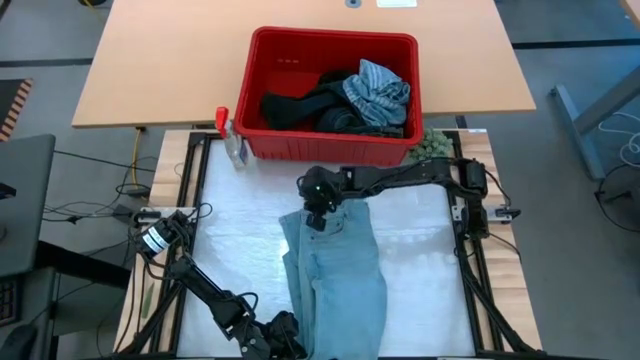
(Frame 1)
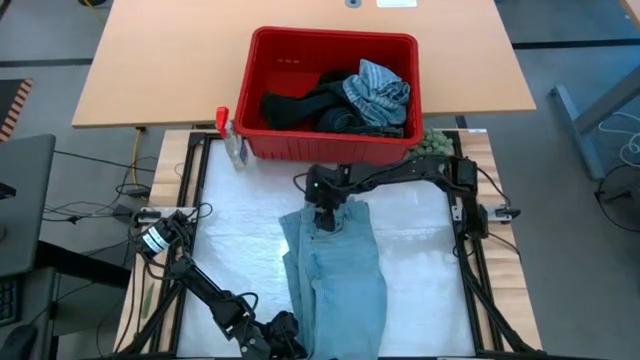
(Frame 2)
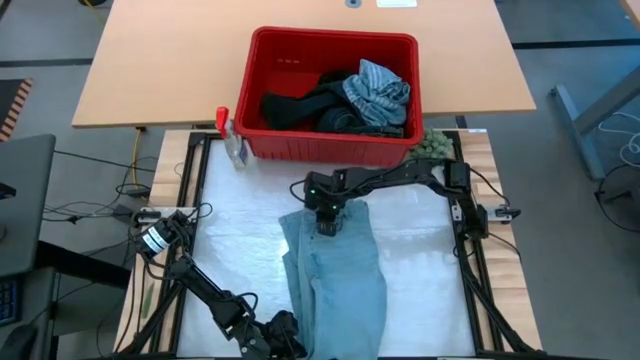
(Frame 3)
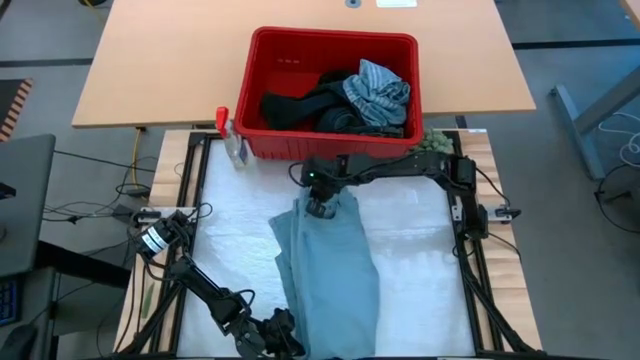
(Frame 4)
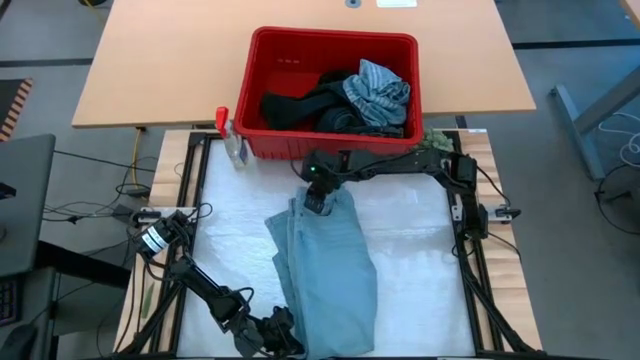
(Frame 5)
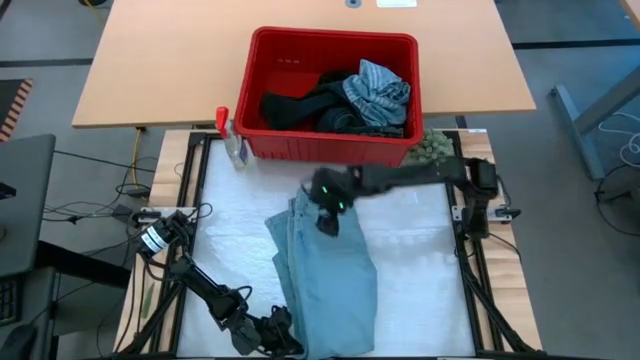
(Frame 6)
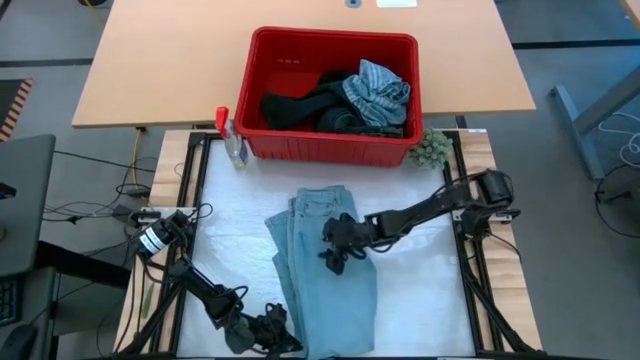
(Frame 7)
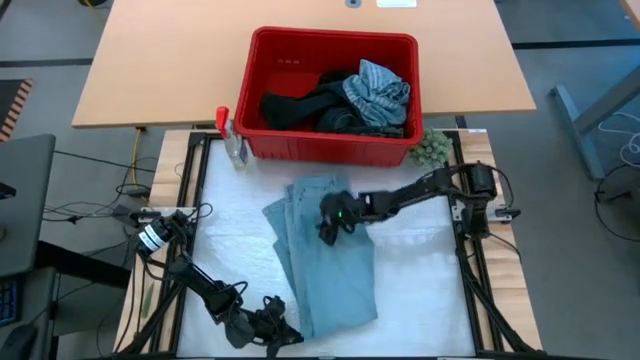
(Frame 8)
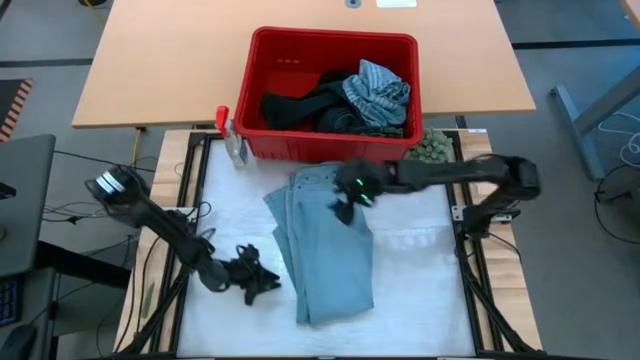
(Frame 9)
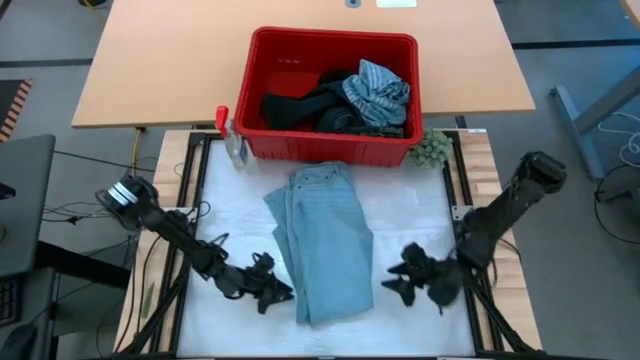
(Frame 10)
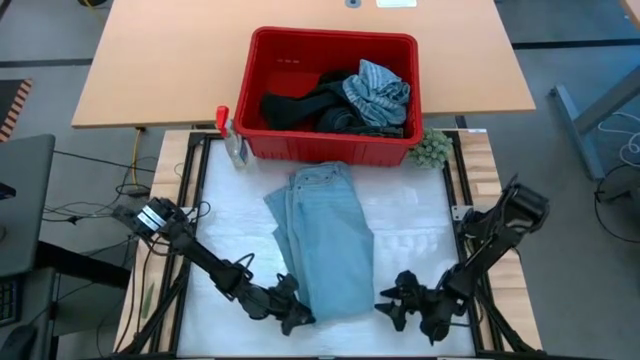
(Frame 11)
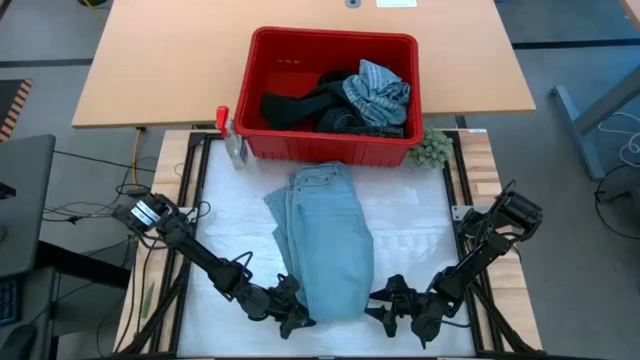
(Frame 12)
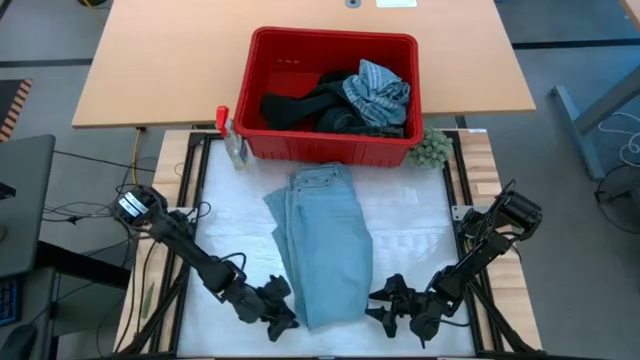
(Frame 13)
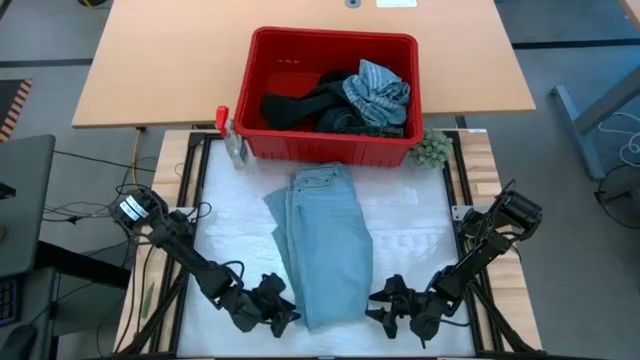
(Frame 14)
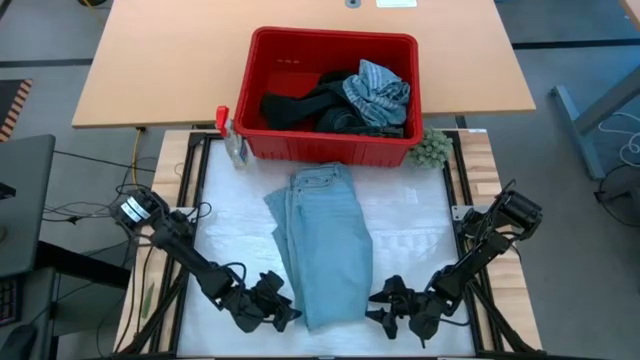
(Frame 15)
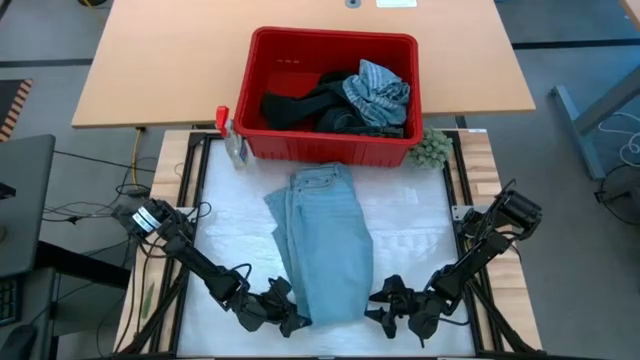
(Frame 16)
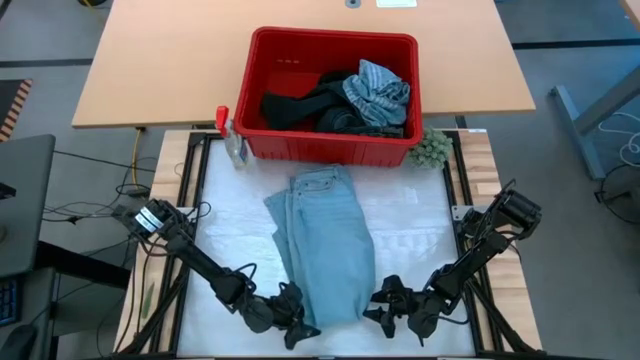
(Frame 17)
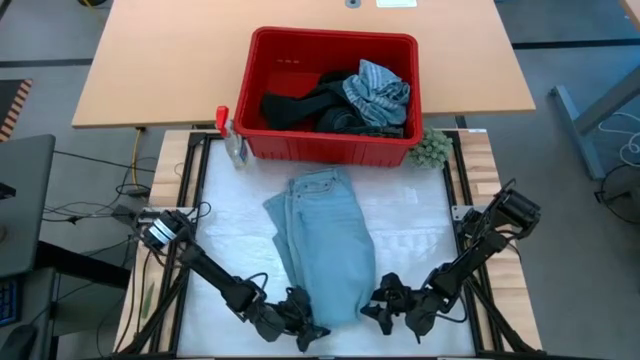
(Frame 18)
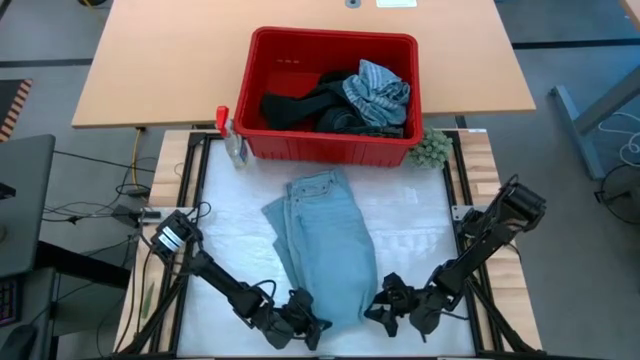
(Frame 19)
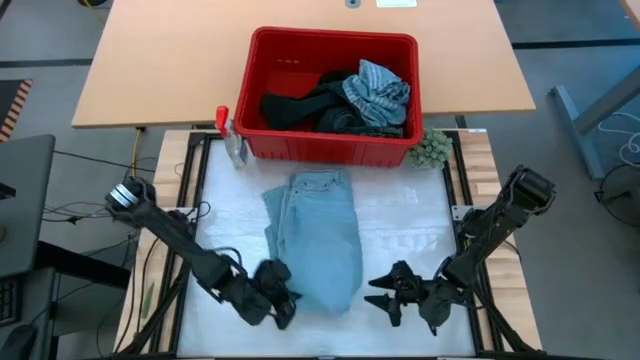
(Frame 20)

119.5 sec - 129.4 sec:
Task: Fold laundry
Fold the blue pants from the red laundry bin

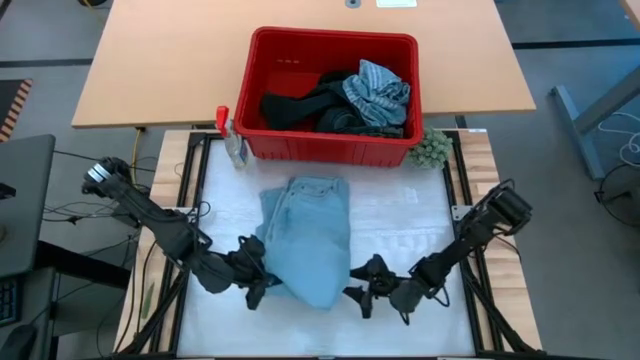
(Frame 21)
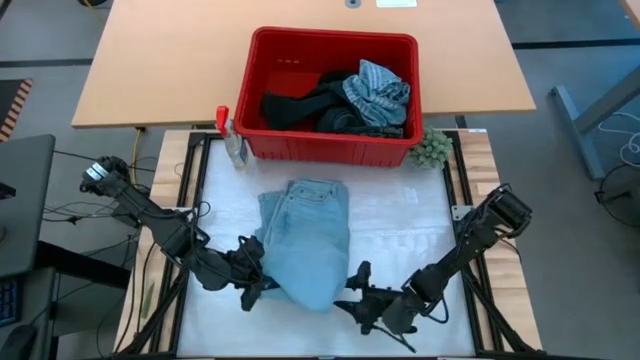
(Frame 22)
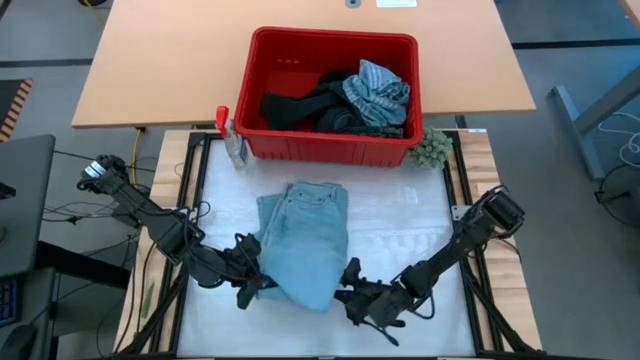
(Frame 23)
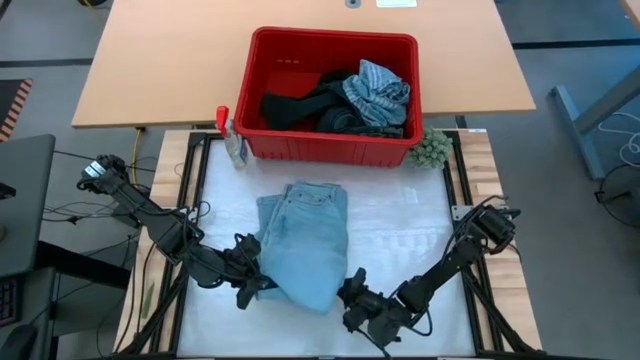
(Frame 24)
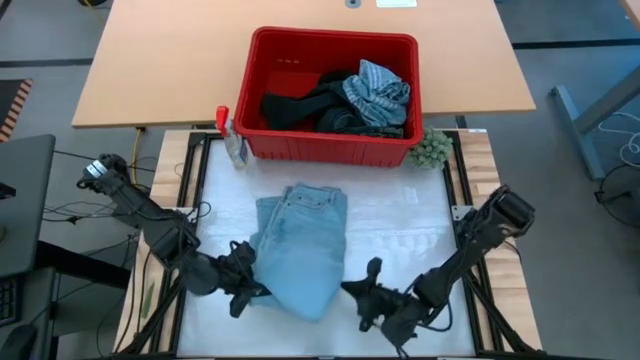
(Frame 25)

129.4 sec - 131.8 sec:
Fold the blue pants from the red laundry bin

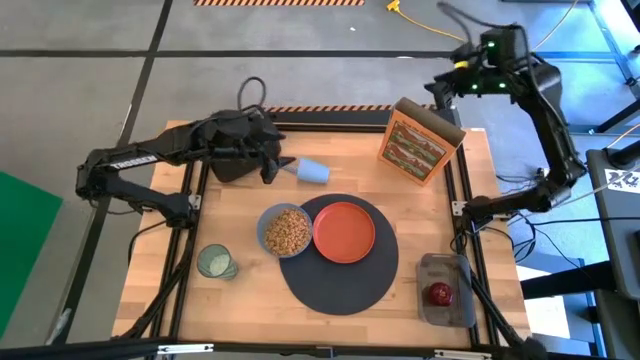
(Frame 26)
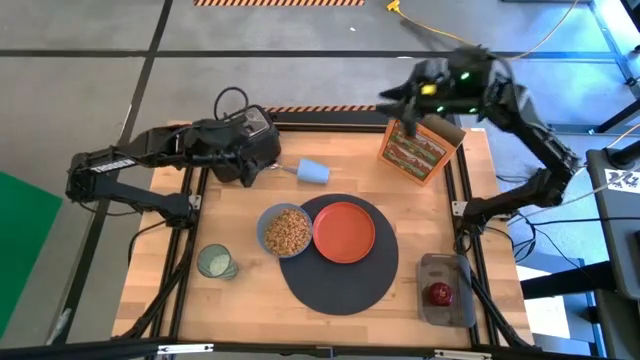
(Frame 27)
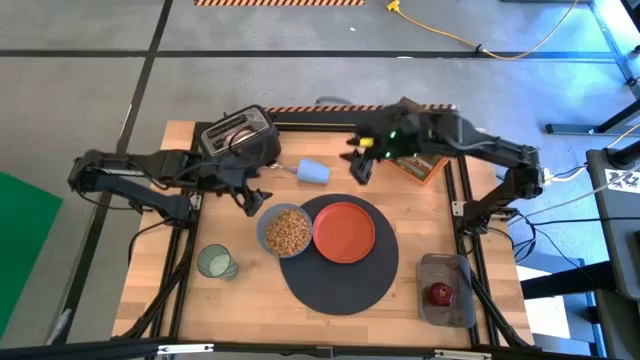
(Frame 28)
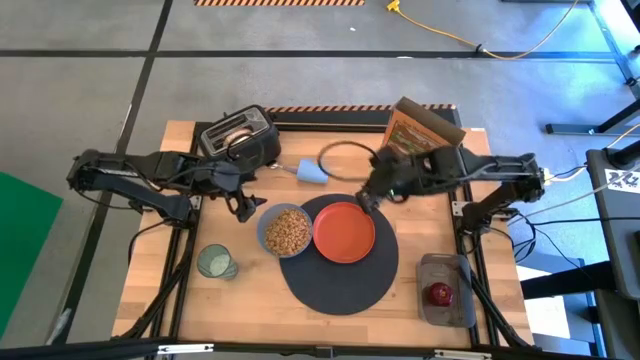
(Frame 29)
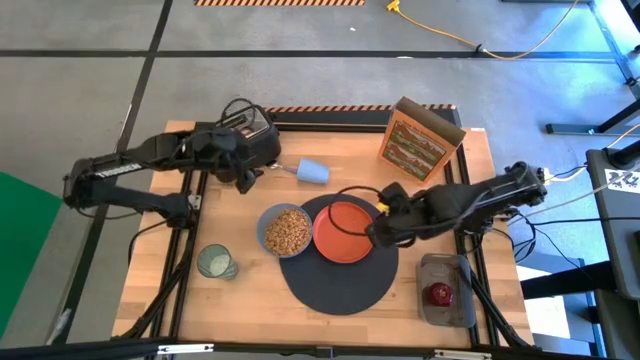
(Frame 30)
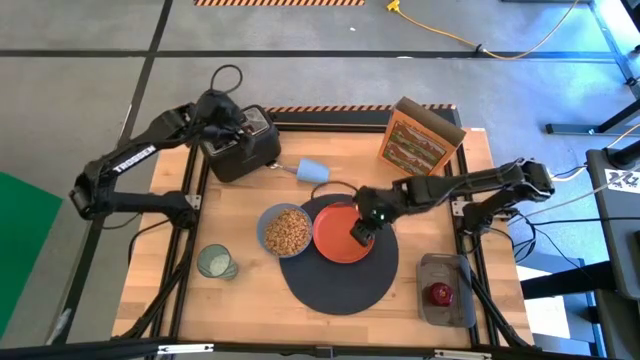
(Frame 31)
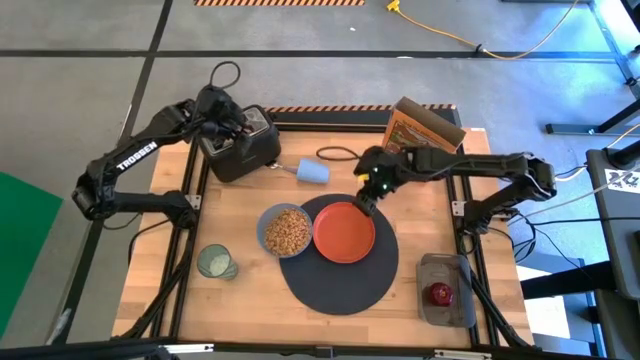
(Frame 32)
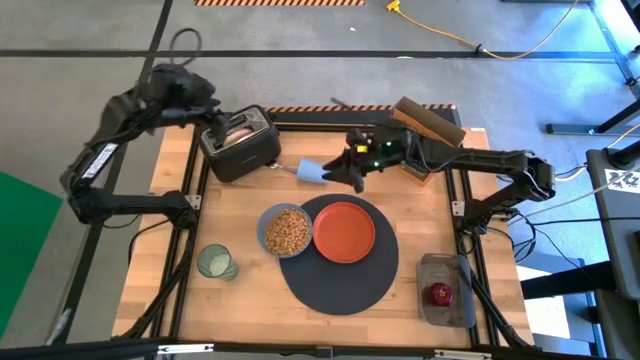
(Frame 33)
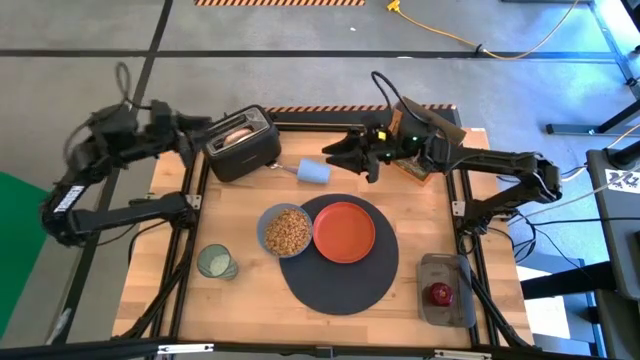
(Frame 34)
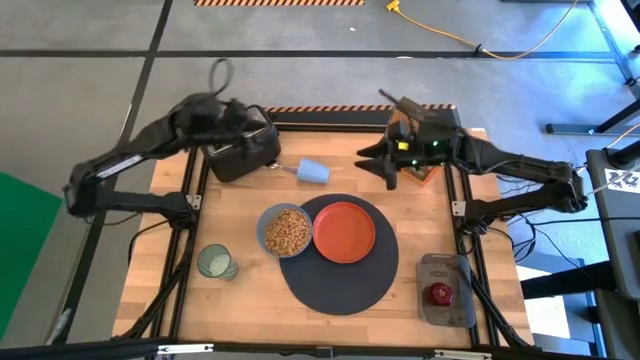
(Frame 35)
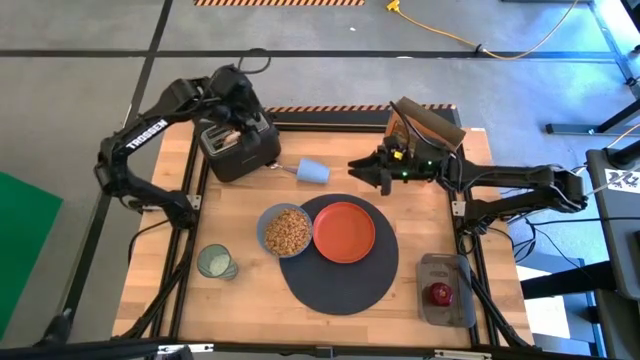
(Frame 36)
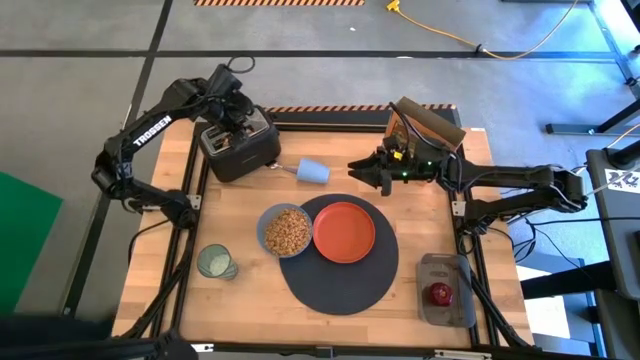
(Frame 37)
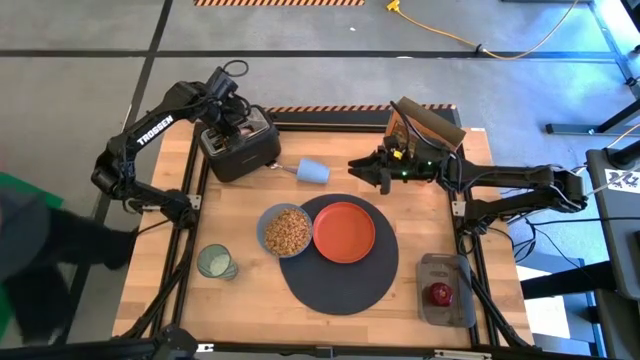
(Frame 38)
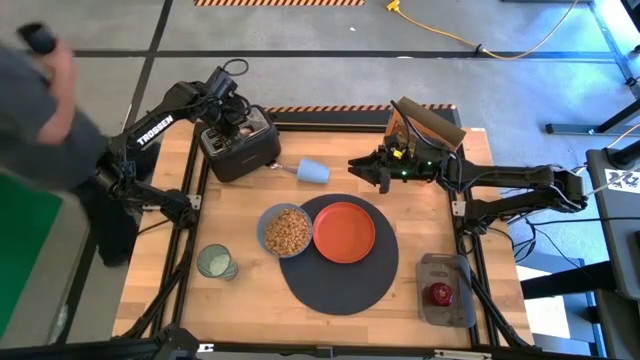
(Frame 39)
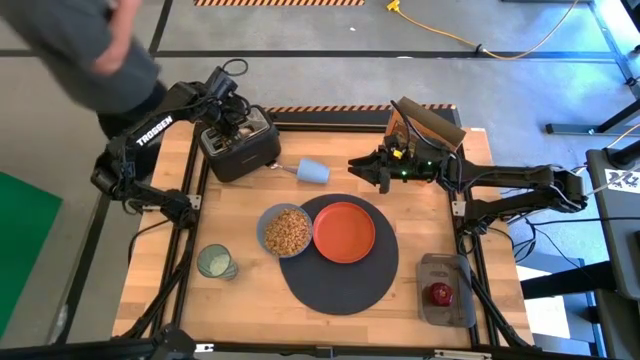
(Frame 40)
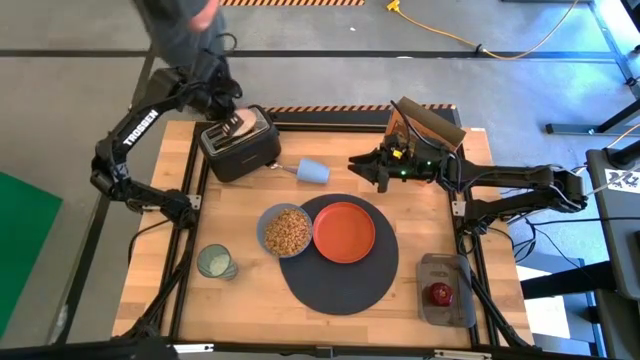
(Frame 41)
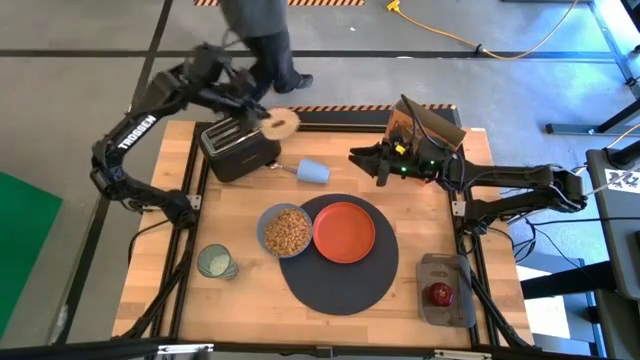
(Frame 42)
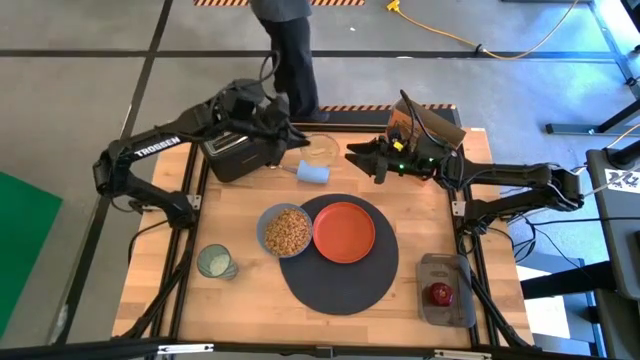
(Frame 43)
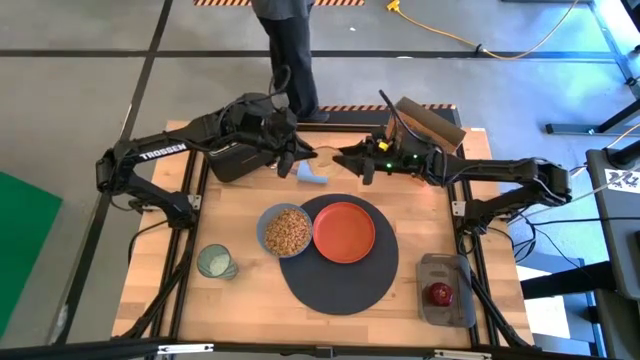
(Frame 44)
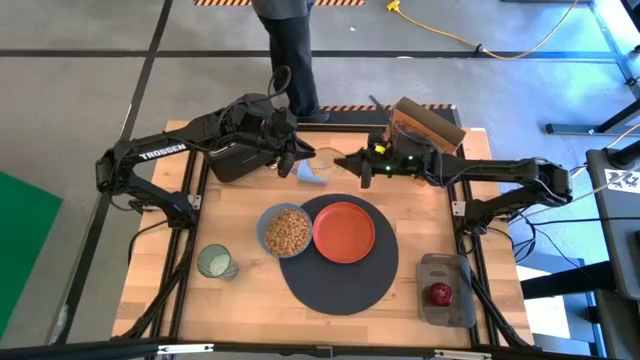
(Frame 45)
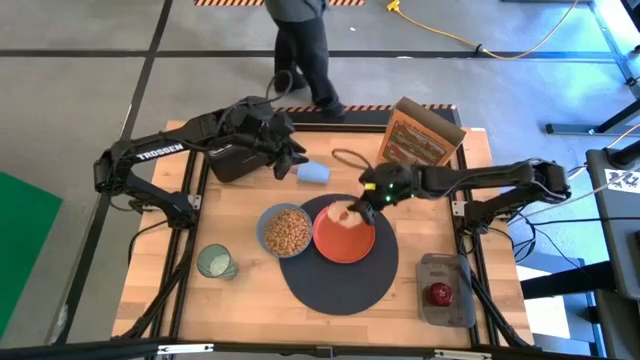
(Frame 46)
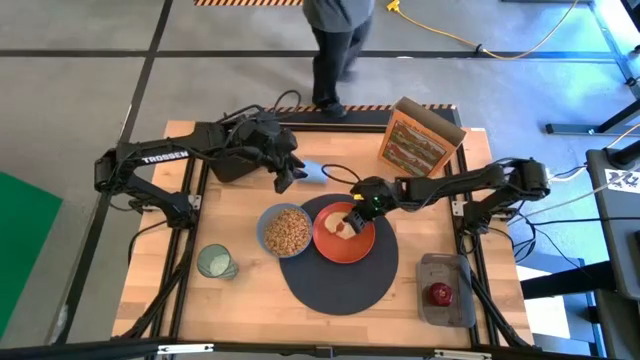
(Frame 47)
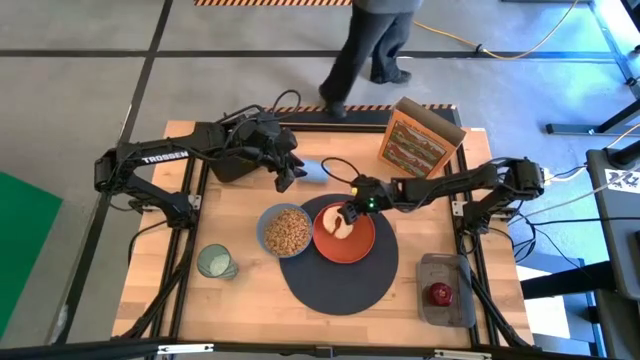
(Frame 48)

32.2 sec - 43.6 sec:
Task: Arrange a breakfast setting
Put the toasted bagel from the toaster on the orange plate
